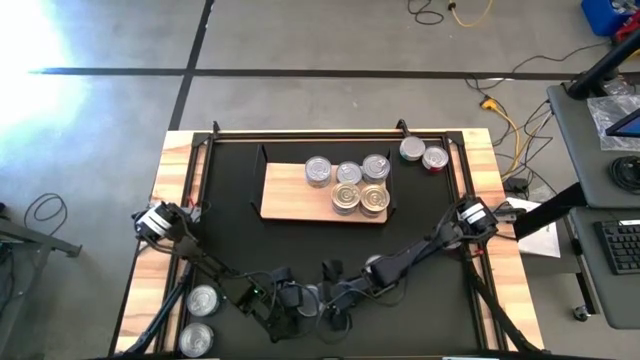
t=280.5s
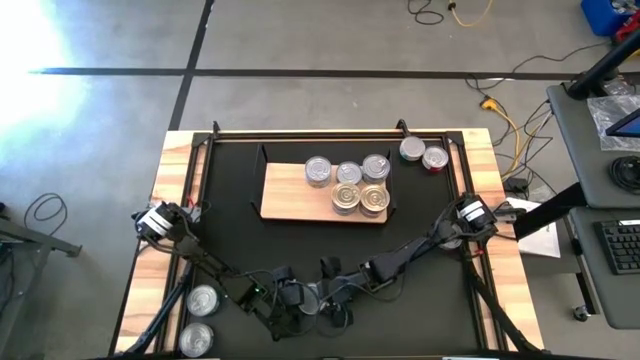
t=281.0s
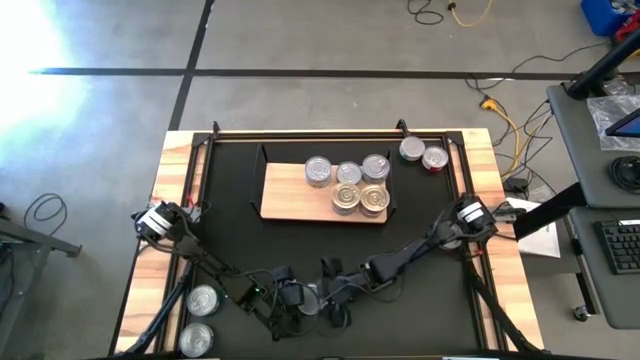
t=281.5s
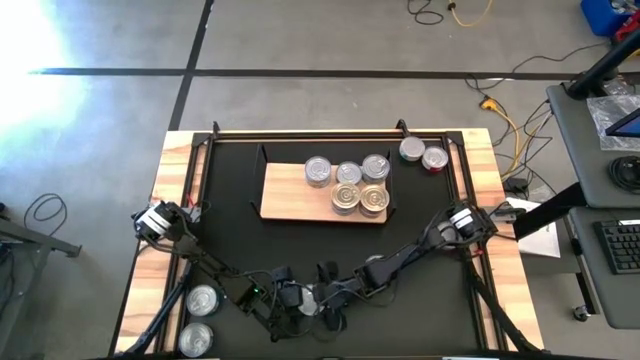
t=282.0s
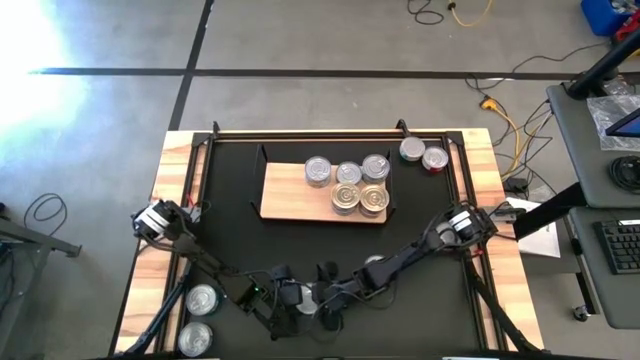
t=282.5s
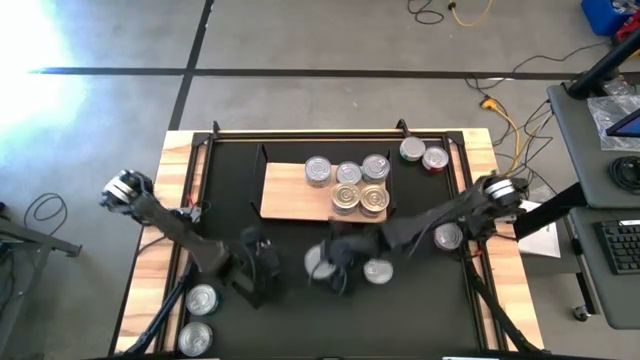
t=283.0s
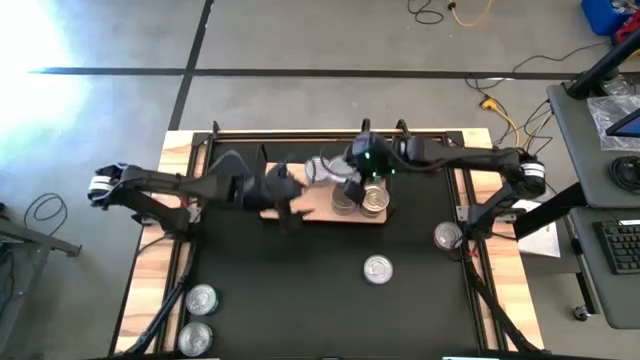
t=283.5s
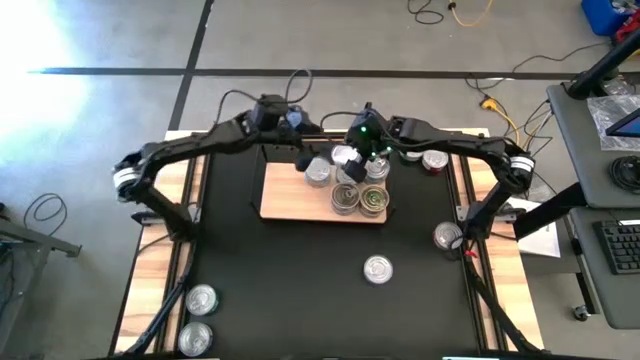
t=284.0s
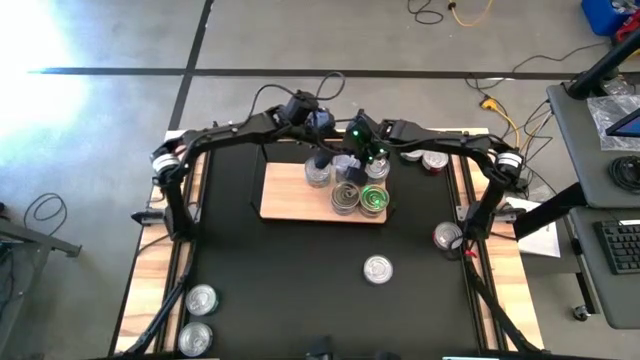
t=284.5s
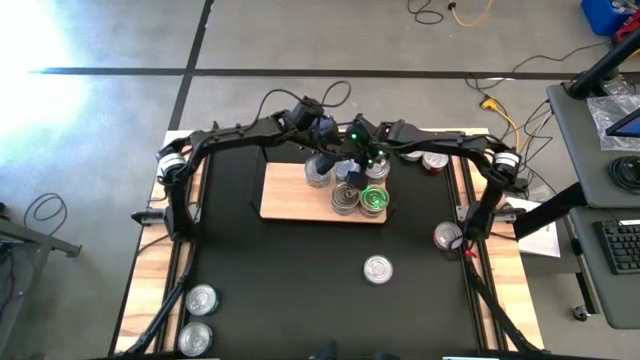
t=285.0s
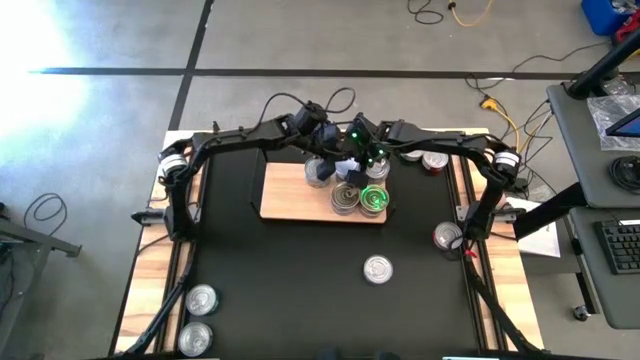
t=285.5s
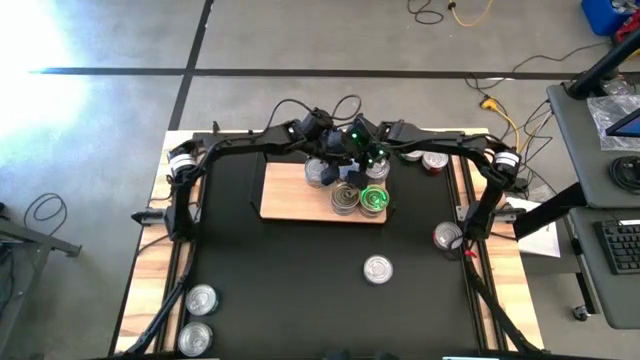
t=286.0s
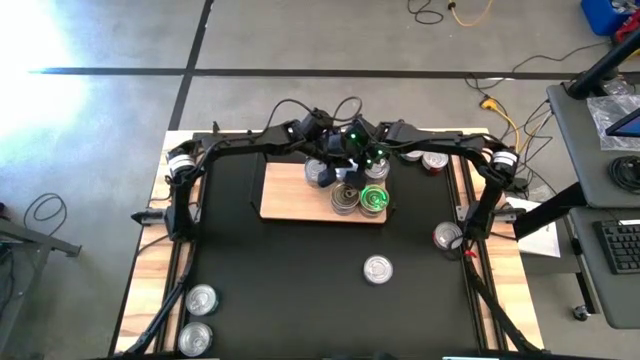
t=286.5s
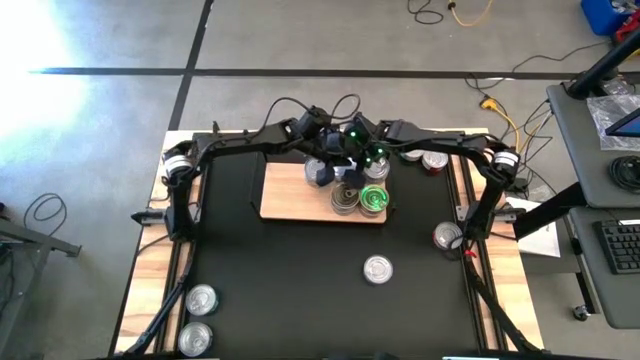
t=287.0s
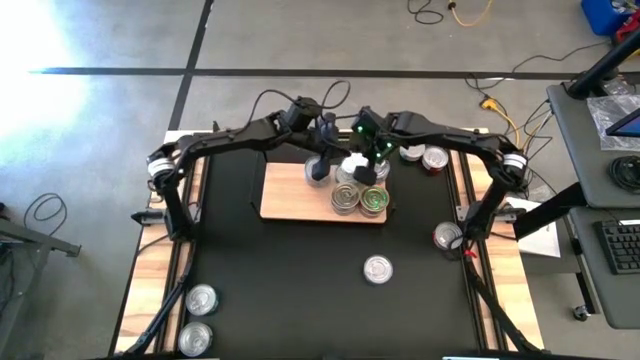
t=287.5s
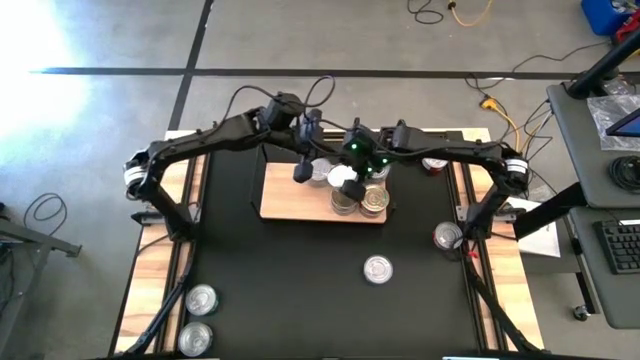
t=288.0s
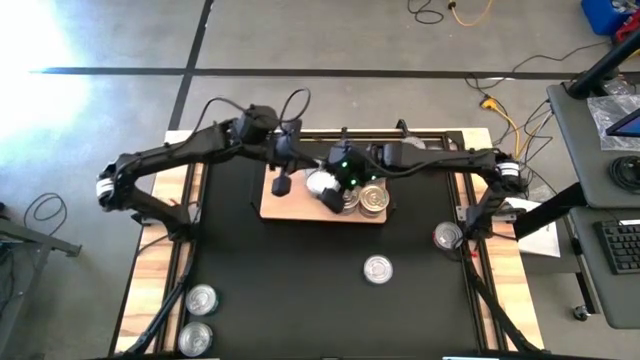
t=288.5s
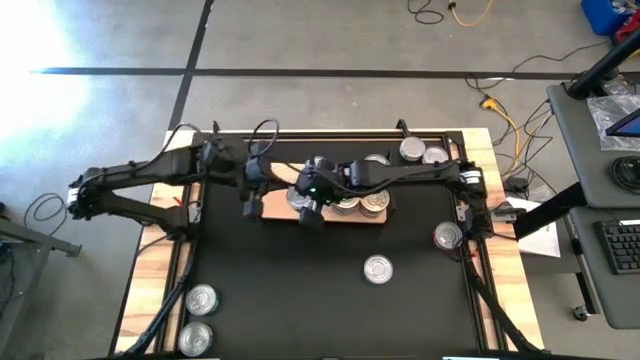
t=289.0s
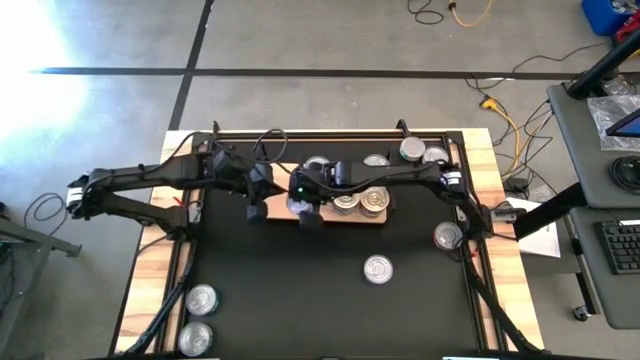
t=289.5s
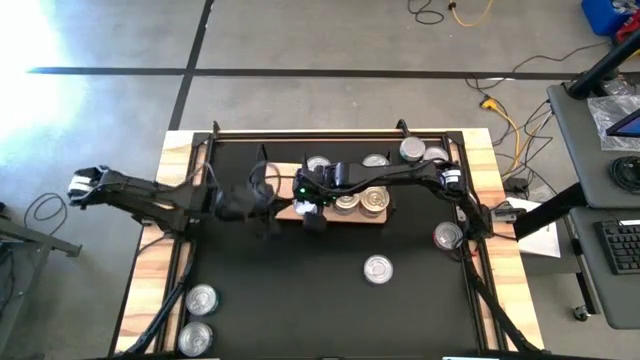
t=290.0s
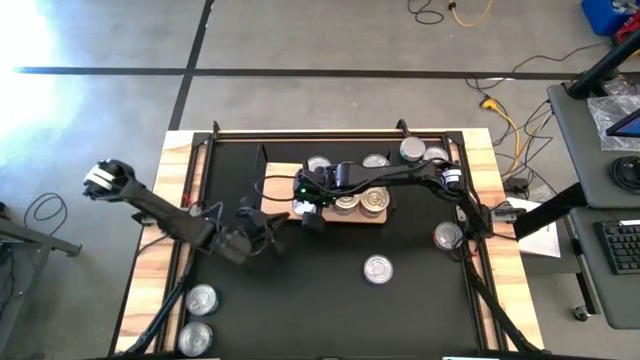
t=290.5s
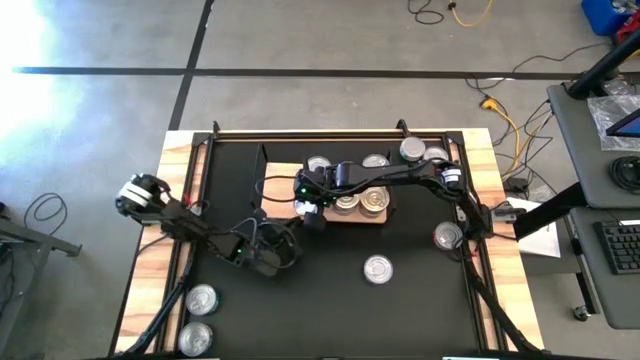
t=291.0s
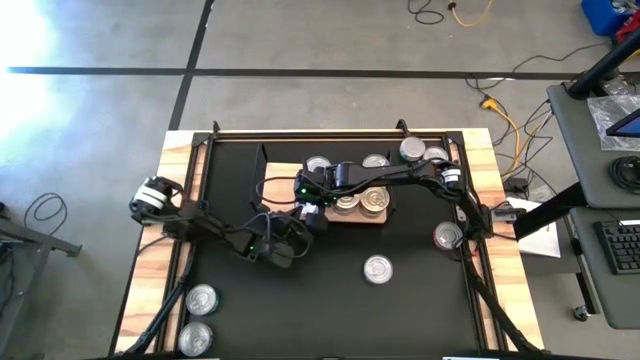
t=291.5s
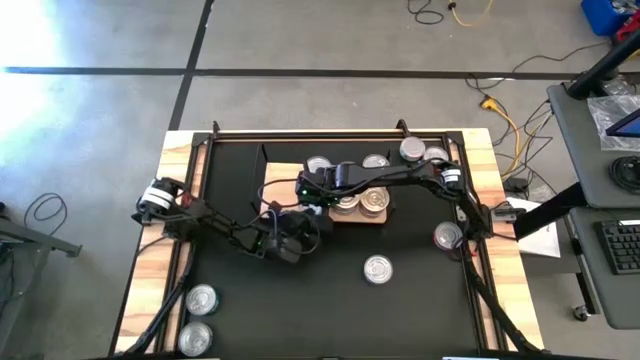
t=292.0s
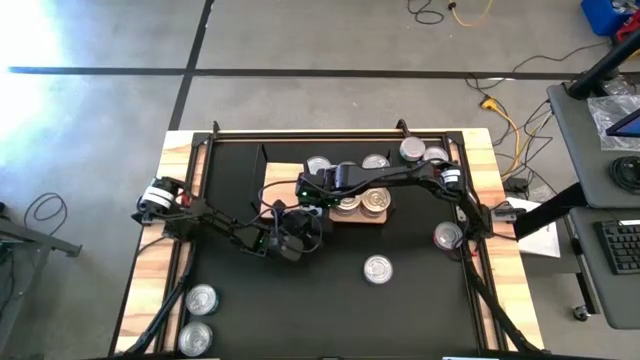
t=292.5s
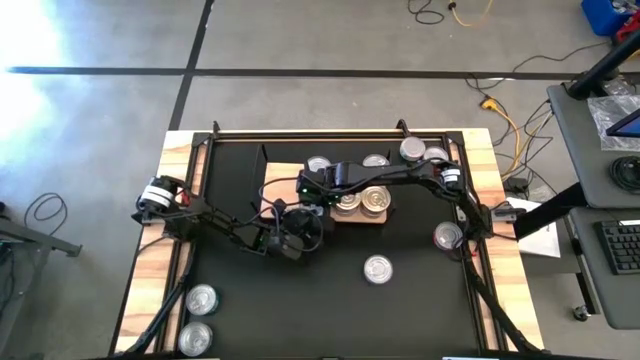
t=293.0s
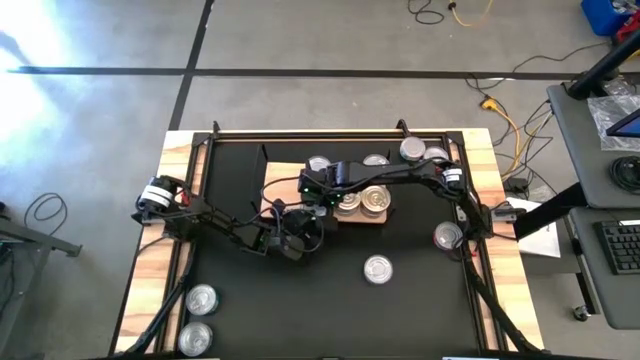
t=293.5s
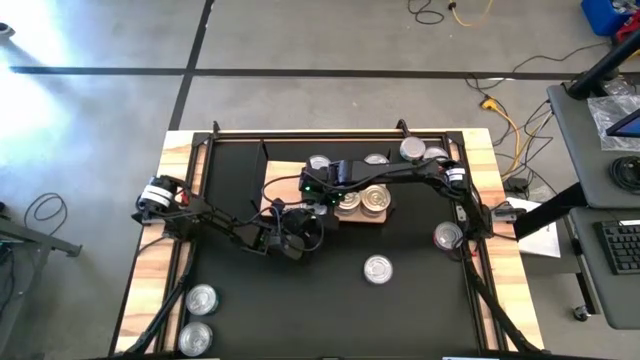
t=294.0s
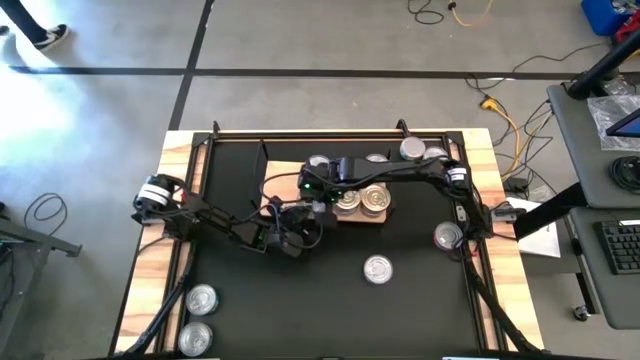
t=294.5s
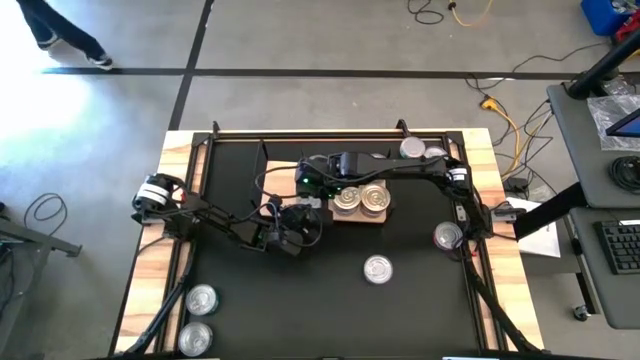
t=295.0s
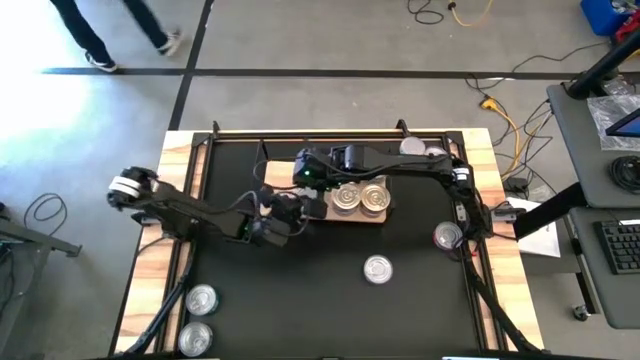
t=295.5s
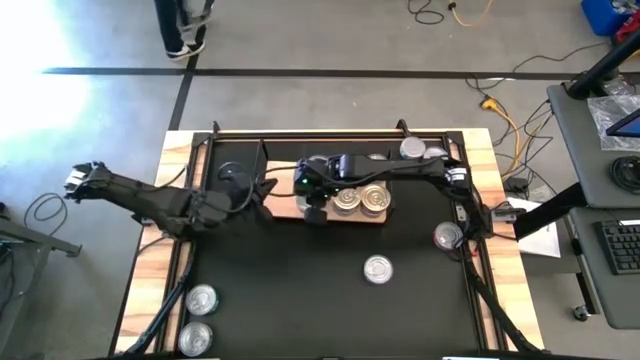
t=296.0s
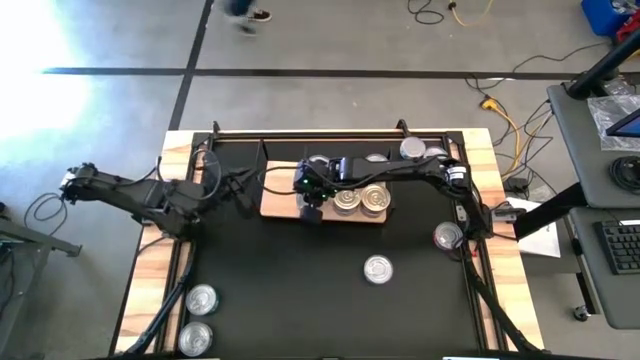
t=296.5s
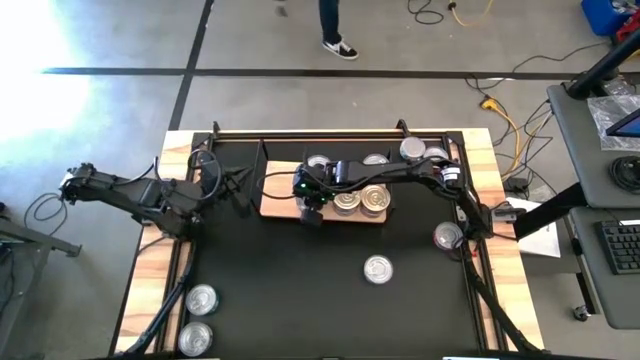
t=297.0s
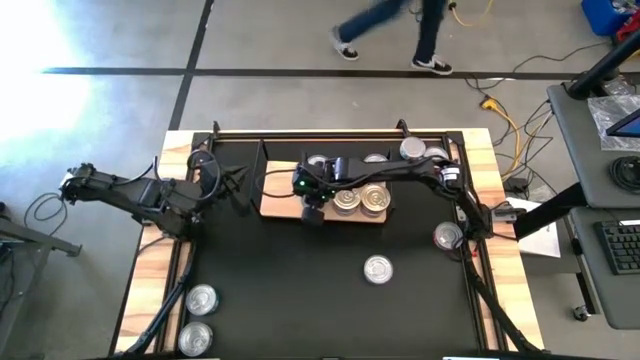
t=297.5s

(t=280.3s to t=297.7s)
Task: Stack canned seafood by type on shelf
Put the bottom right green and white tuna can on the shelf

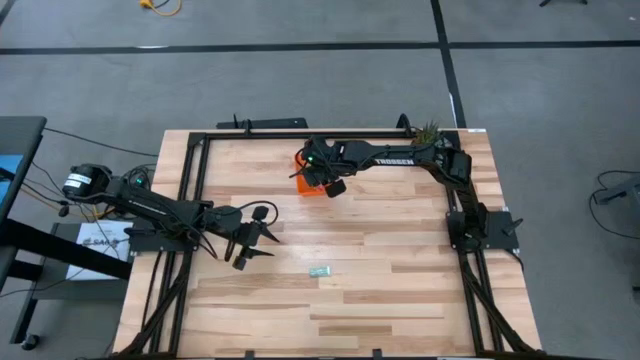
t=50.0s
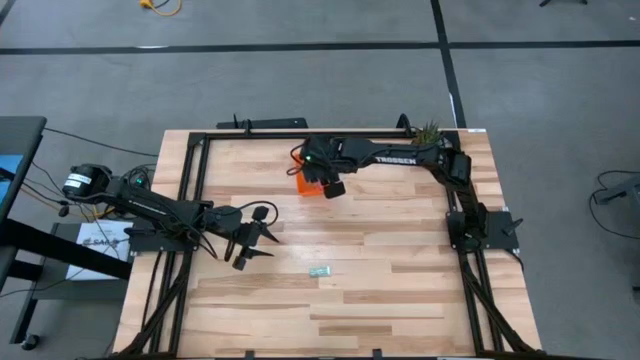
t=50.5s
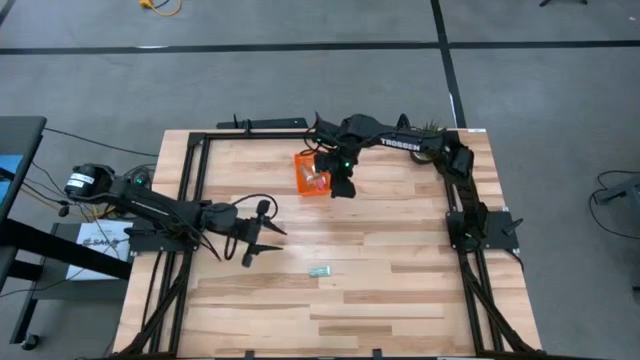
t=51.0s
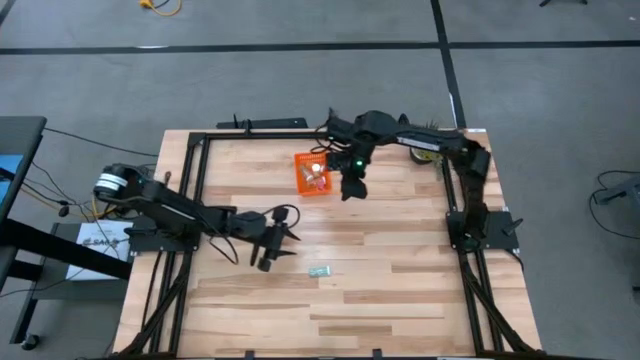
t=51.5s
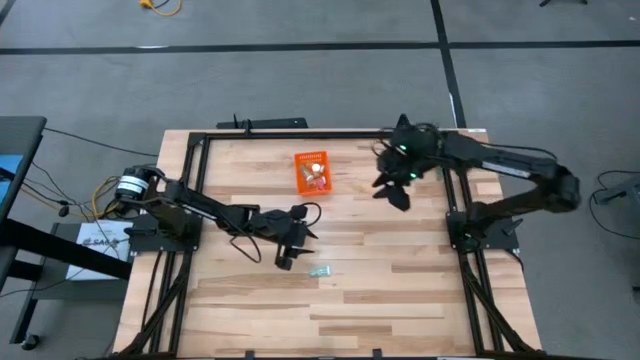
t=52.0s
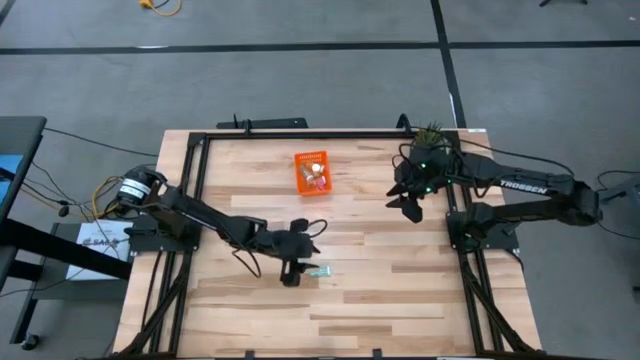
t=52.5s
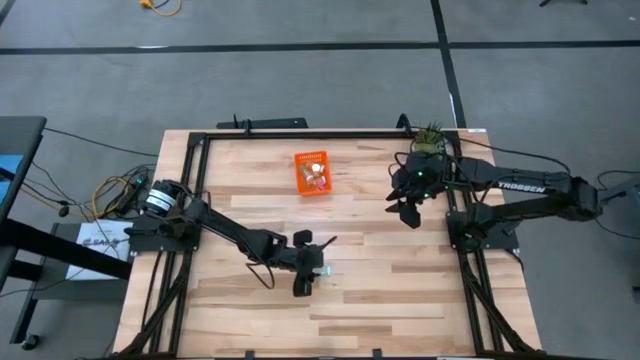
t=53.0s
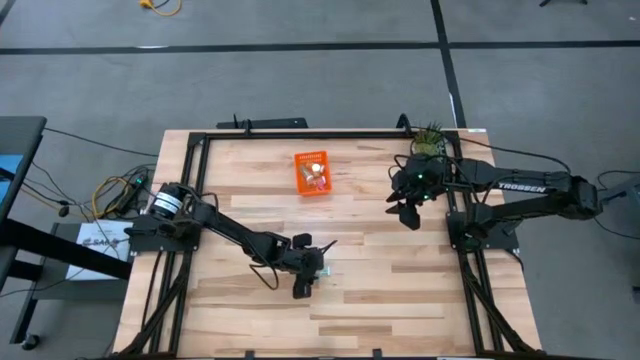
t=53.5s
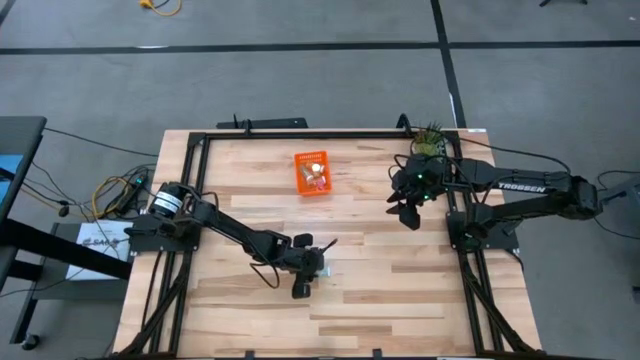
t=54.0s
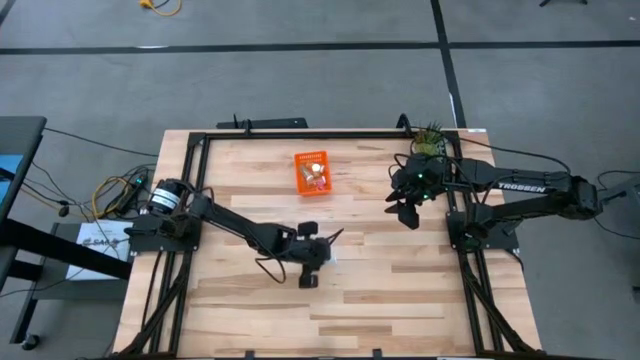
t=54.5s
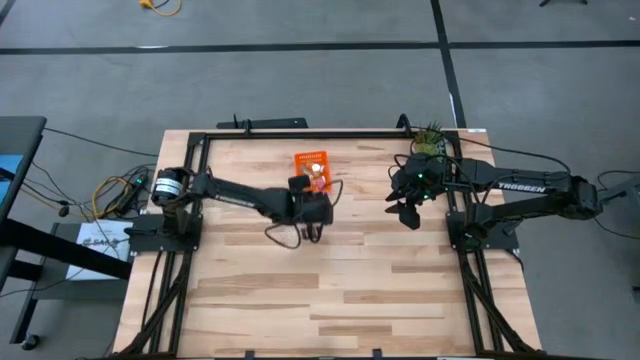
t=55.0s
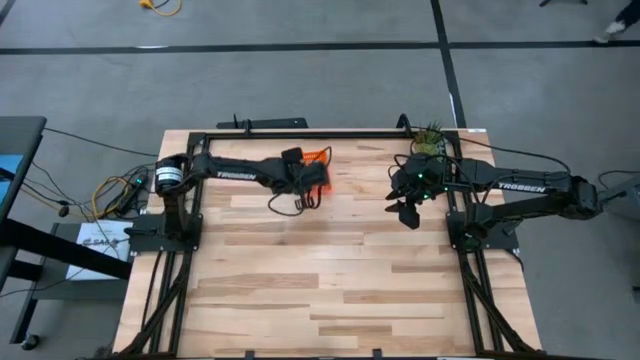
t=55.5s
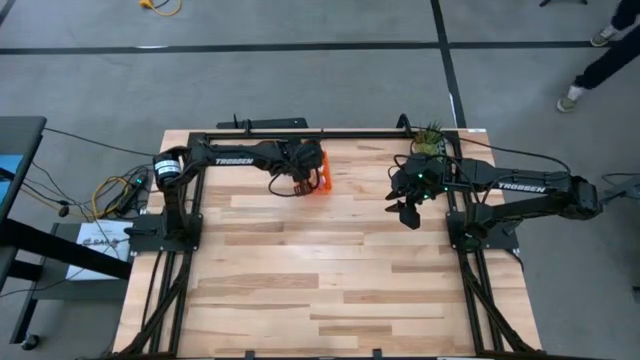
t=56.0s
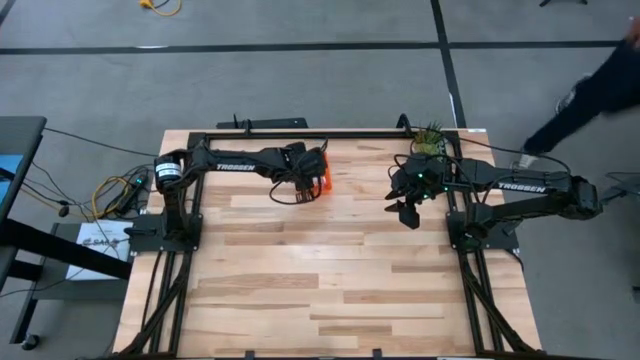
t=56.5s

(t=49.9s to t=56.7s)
Task: Pick and place pill bottles into a basket
Put the blue pill bottle into the orange bin
